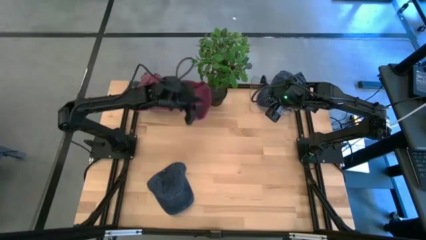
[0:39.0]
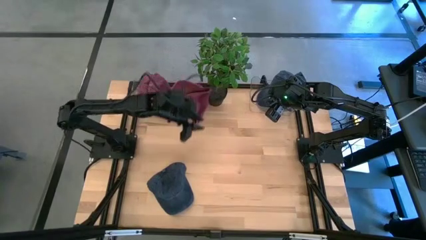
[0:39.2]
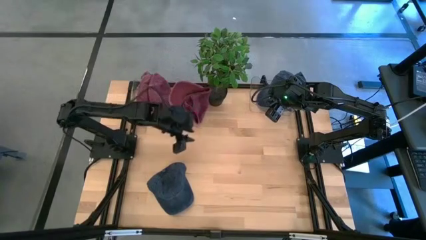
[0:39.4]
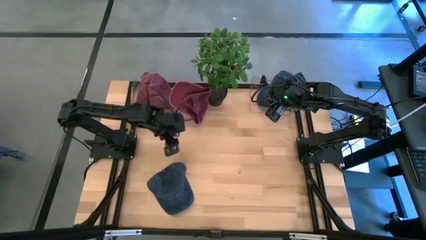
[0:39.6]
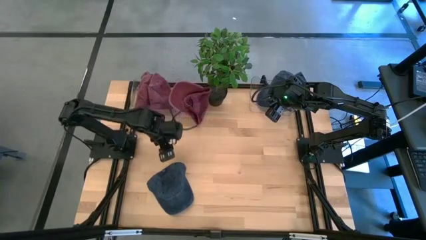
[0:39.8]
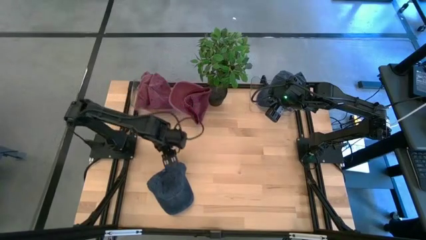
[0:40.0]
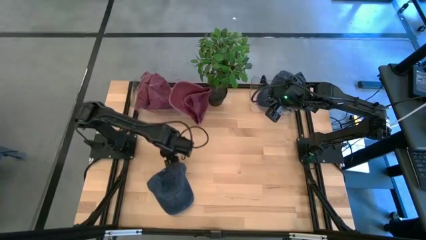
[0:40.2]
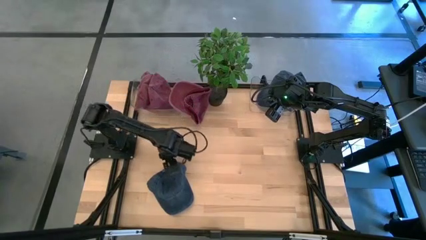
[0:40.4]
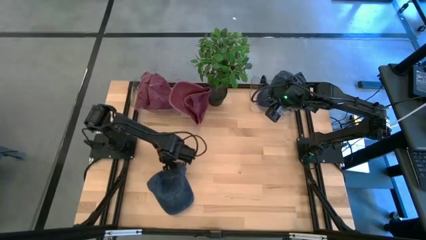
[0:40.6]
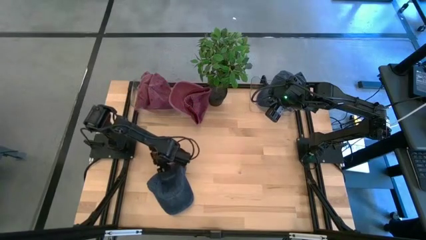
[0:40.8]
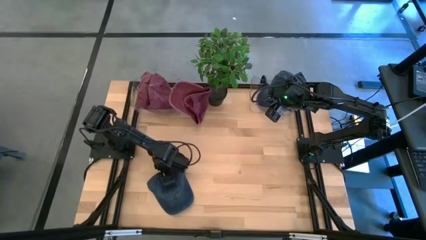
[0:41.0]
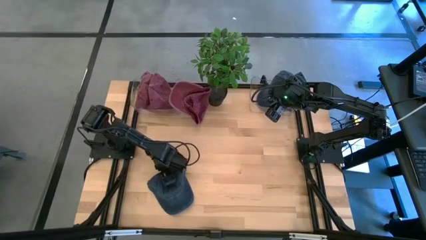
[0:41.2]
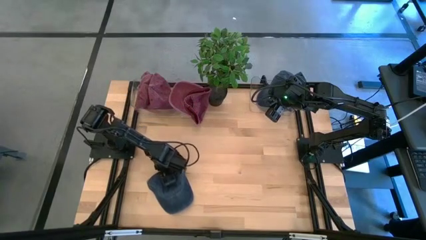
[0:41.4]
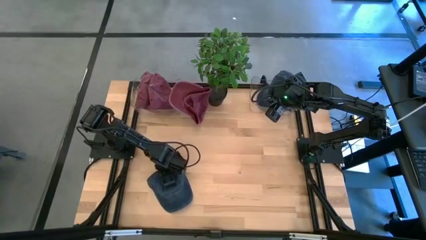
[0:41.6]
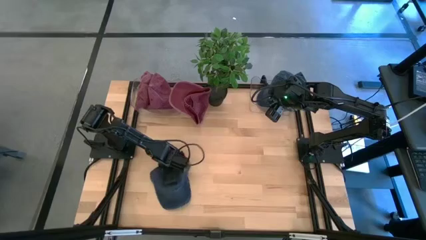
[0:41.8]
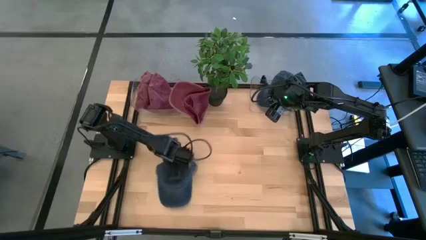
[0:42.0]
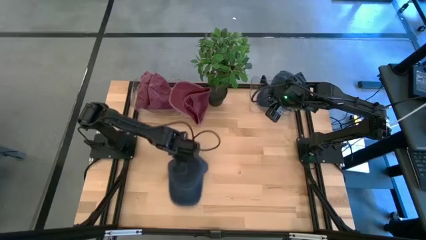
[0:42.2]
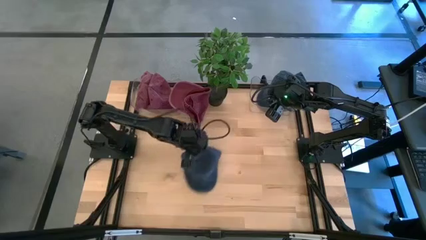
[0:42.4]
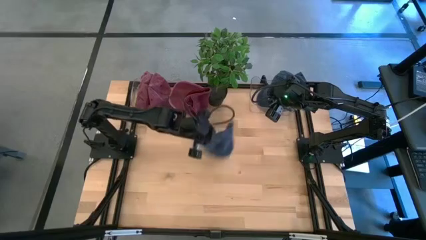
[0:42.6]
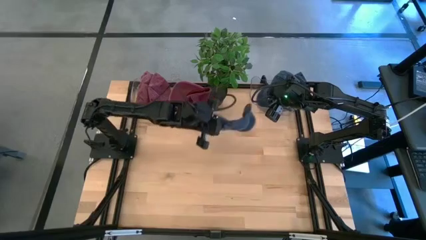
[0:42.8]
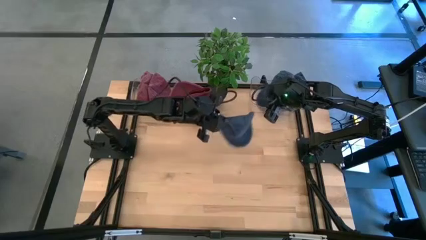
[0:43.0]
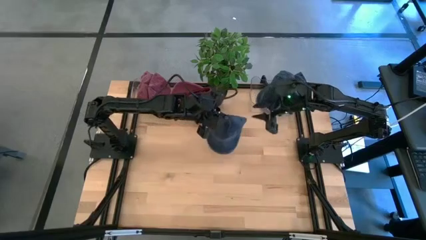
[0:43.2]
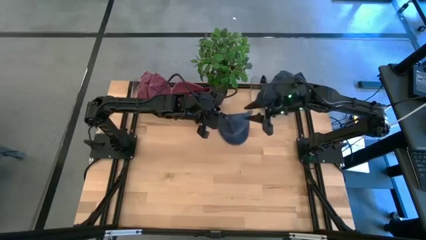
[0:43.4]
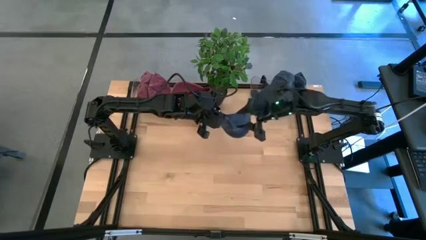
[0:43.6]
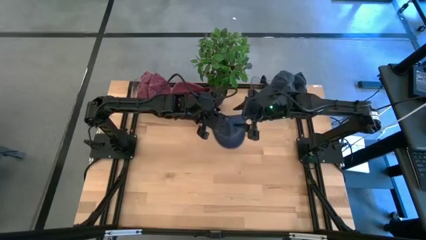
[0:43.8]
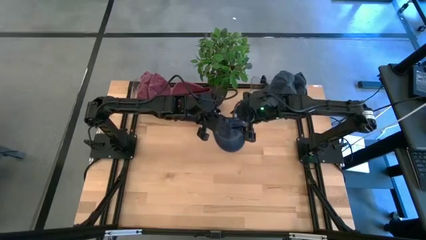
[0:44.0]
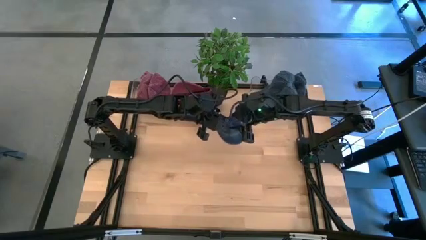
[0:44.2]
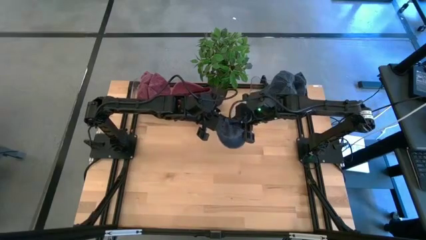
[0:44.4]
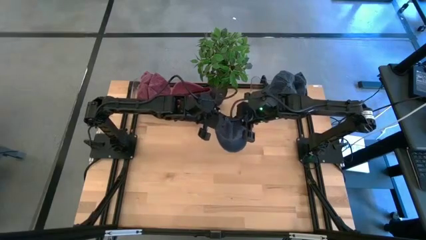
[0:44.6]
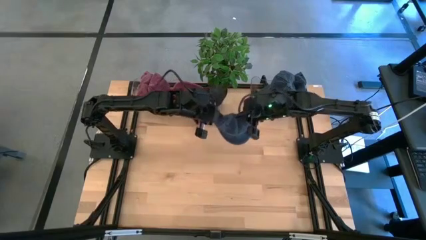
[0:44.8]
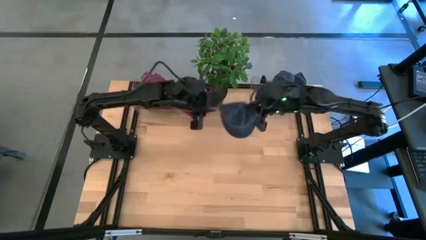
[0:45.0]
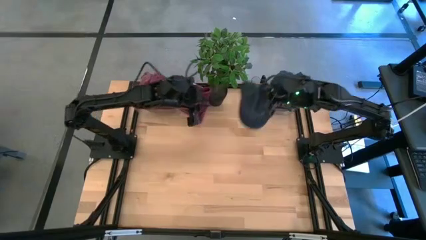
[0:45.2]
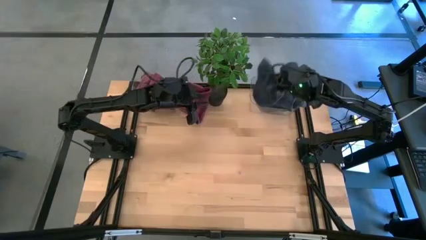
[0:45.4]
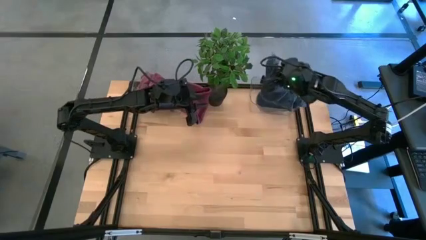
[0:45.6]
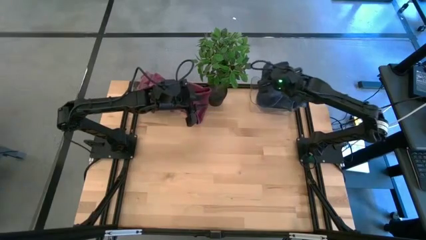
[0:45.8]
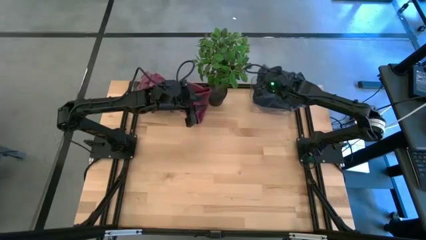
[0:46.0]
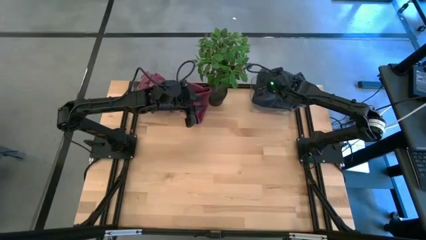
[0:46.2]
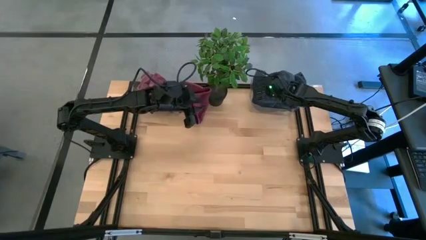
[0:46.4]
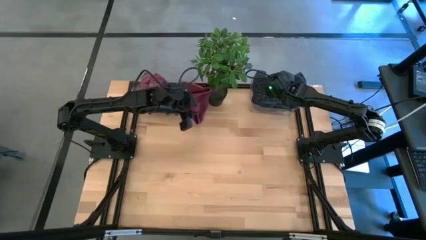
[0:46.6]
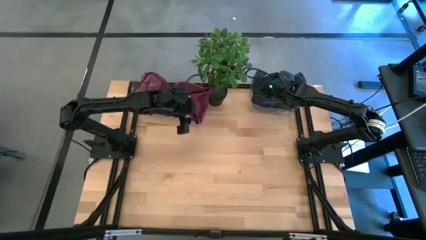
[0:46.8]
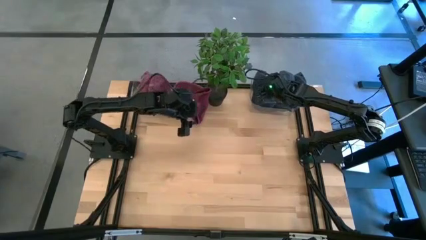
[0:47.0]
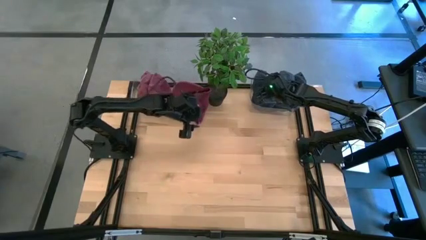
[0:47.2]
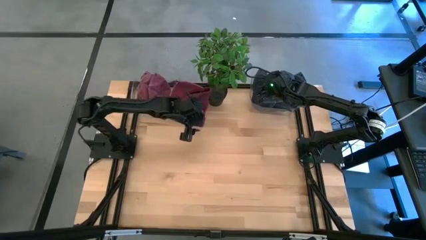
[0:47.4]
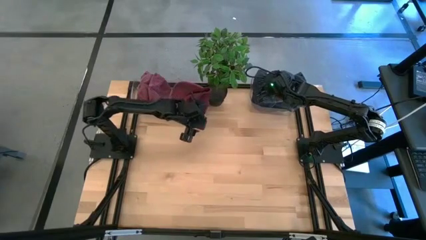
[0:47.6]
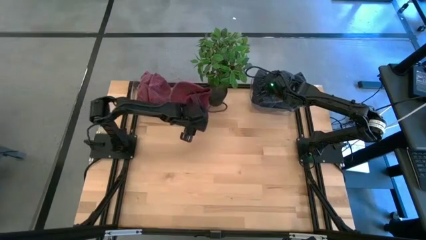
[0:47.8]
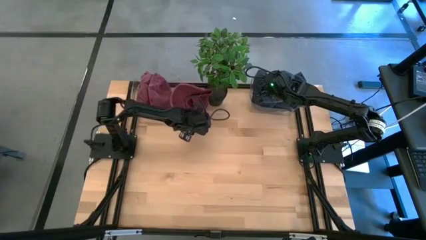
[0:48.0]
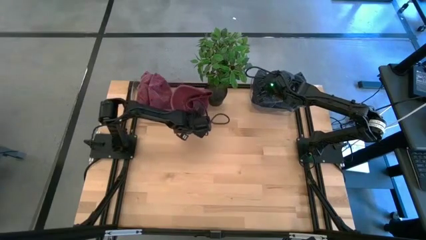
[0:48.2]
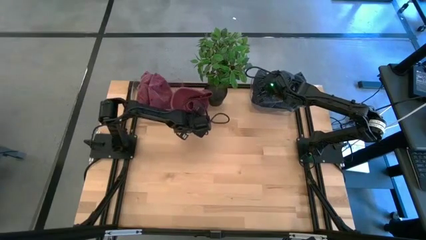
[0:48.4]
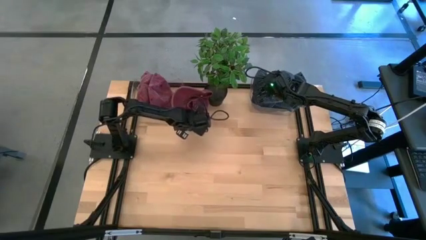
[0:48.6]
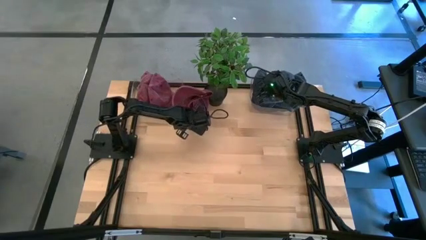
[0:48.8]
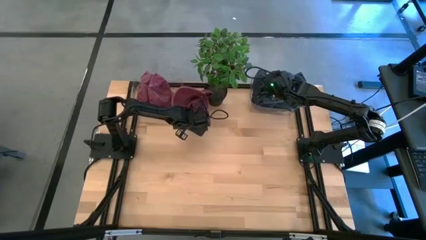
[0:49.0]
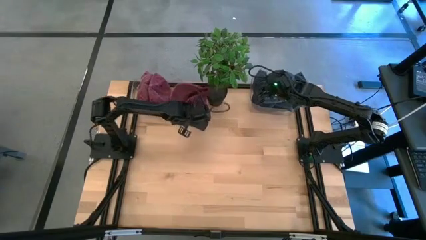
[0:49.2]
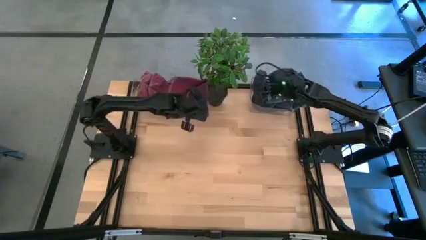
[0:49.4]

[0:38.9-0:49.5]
Task: Pick & Place hat
Put the black cap into the right transparent bin
